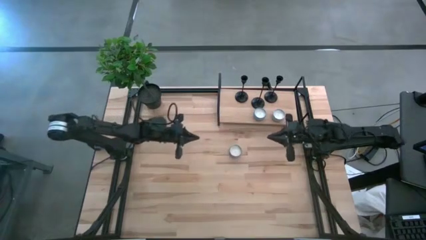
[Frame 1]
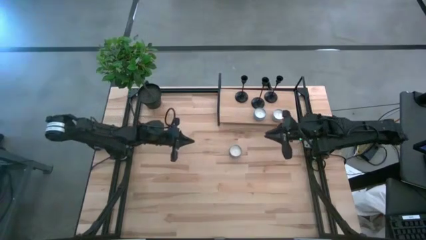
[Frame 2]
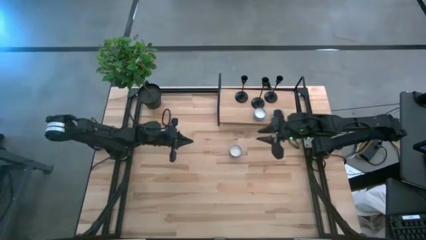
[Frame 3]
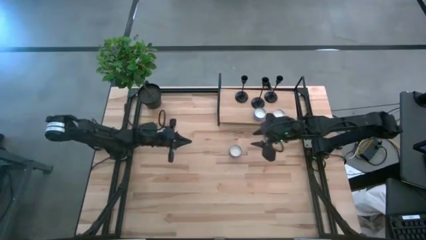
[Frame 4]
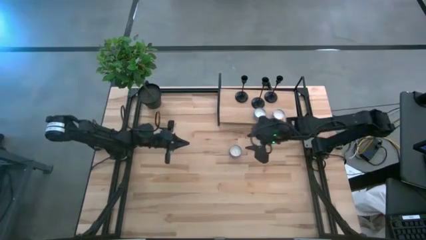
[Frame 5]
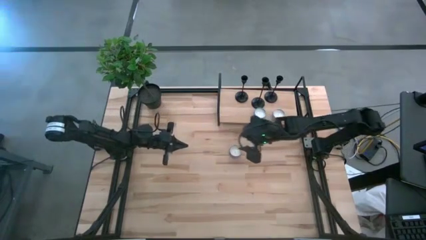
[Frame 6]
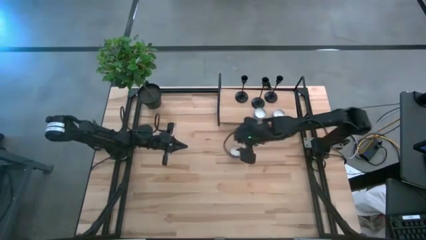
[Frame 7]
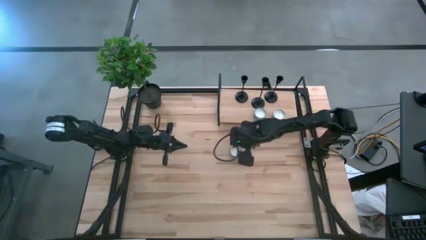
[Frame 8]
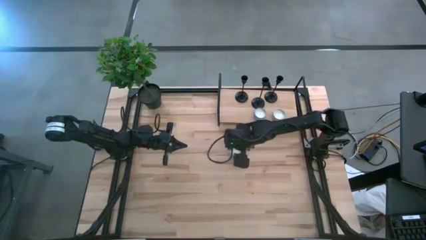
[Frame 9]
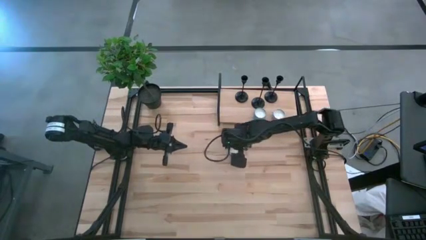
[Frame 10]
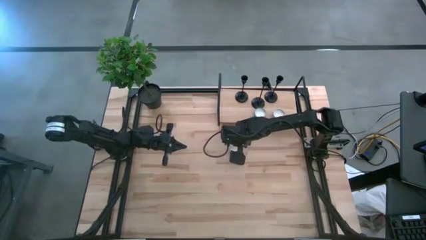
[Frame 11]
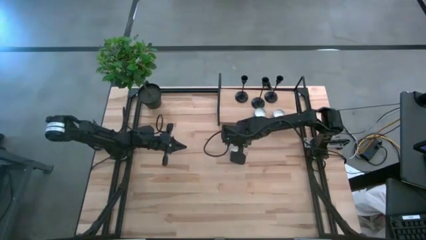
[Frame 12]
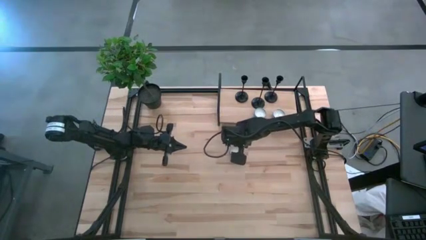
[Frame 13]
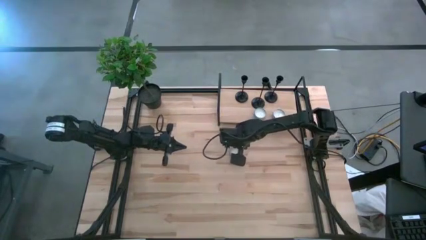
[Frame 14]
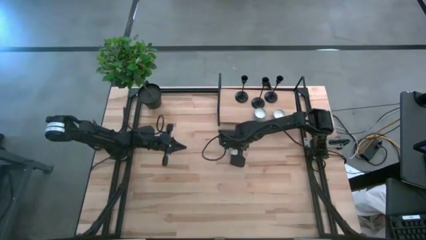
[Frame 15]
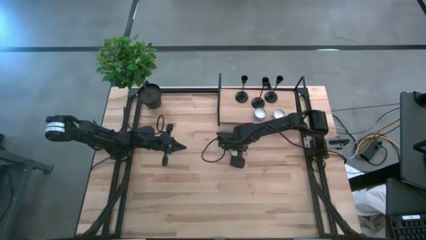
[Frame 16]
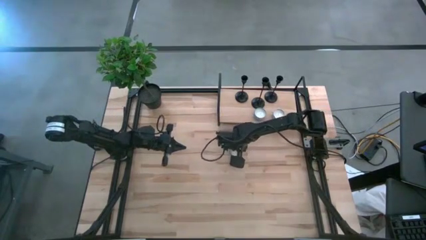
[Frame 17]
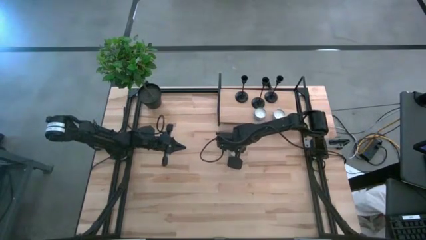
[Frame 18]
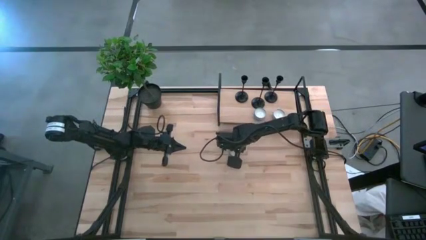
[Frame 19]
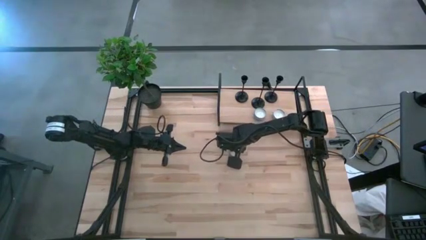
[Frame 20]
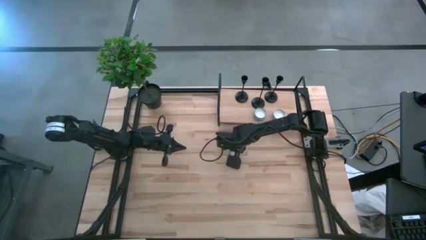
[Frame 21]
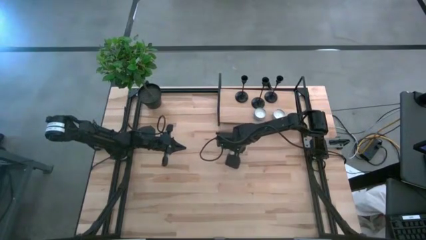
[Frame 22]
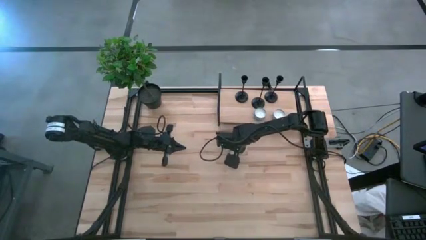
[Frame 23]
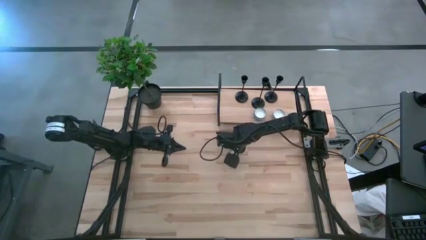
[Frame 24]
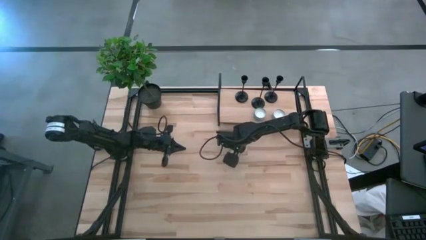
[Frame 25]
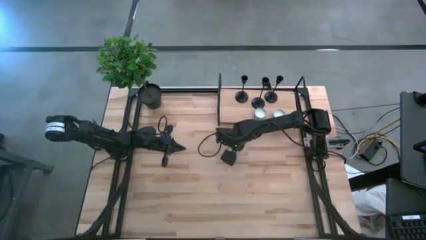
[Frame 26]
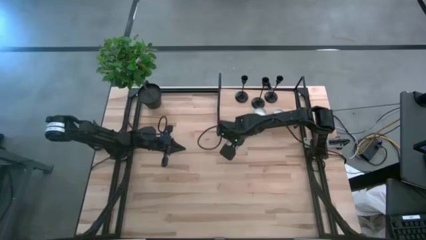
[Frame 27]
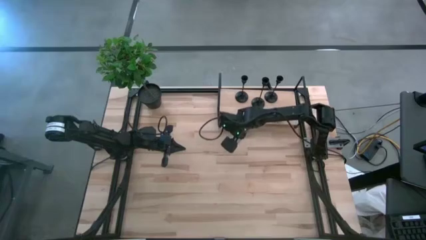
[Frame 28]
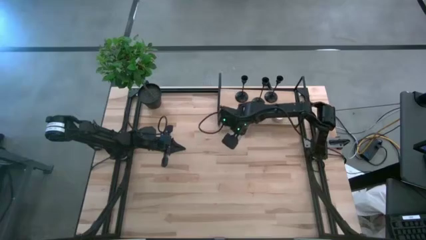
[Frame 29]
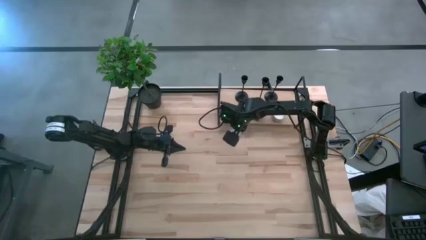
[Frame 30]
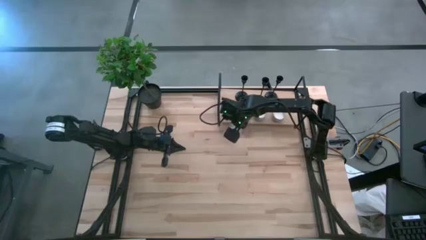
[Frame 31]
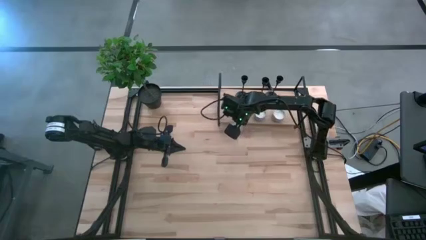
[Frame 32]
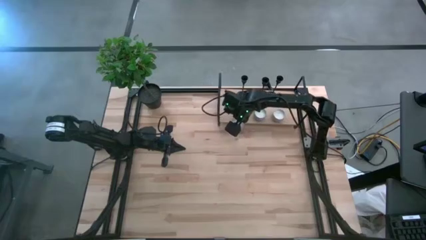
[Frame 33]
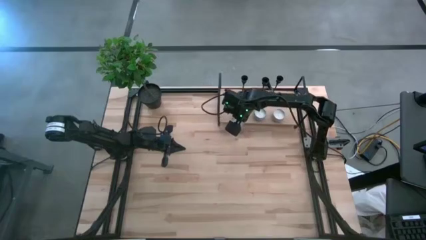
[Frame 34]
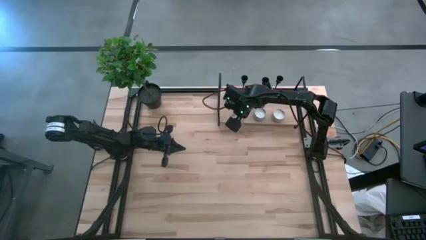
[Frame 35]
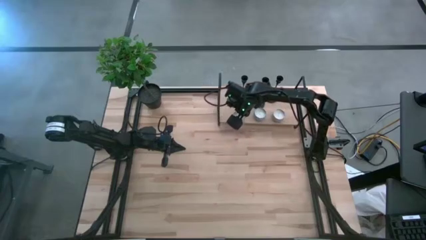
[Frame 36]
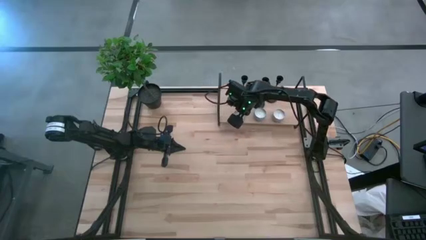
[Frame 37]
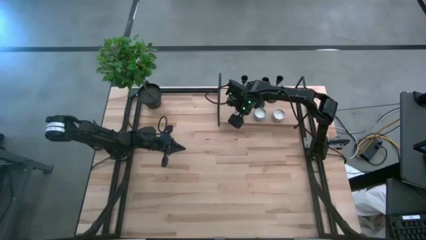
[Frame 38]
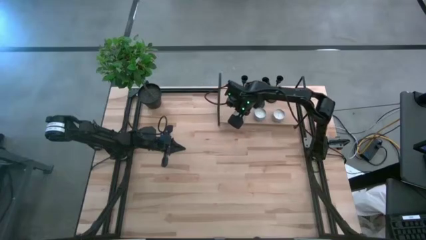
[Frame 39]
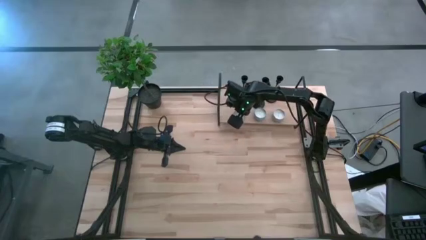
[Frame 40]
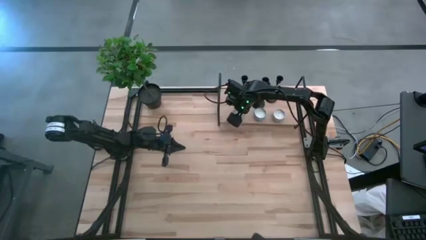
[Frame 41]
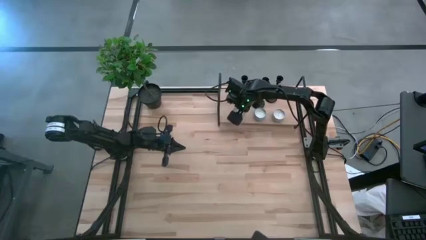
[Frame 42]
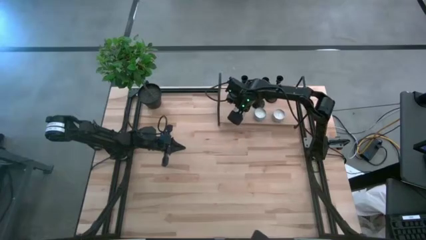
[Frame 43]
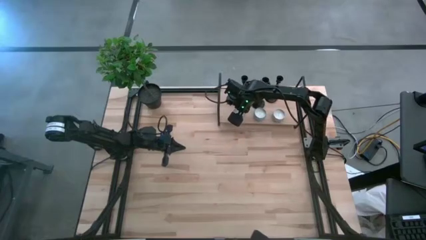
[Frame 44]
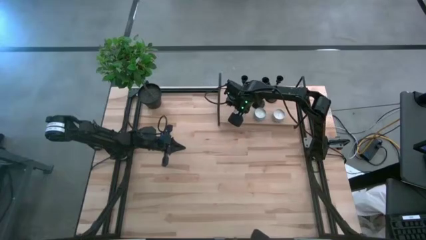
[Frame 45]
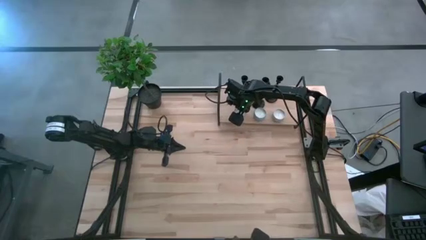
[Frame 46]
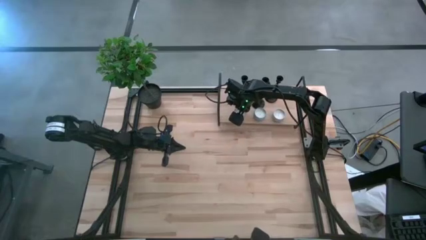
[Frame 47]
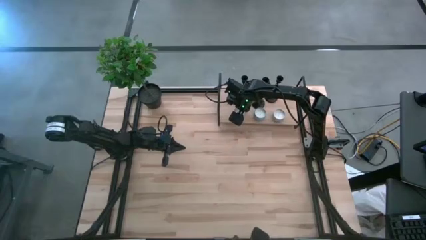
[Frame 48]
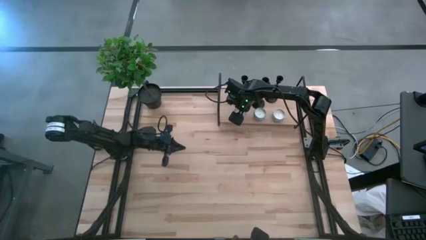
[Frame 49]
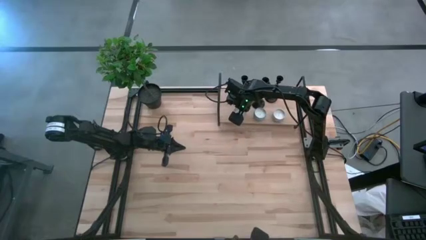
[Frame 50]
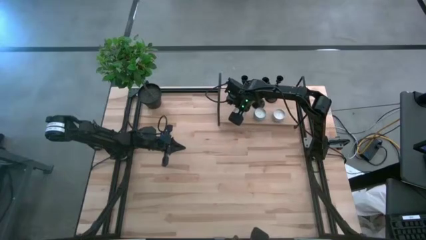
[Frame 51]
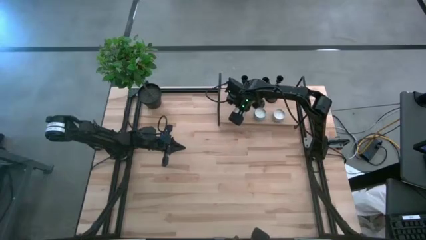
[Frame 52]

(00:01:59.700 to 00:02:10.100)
Task: Pick & Place candle stick holders
Put the pink scented candle on the shelf

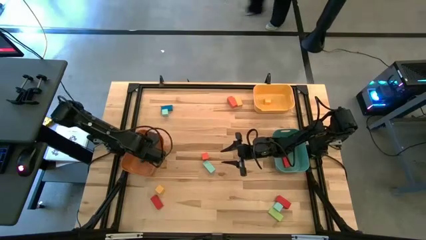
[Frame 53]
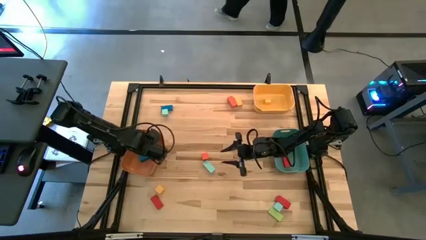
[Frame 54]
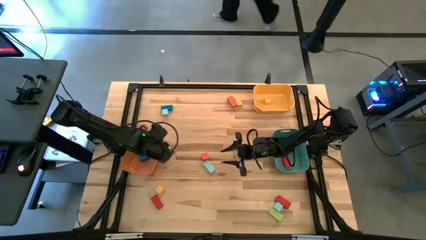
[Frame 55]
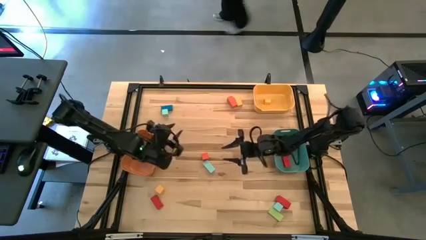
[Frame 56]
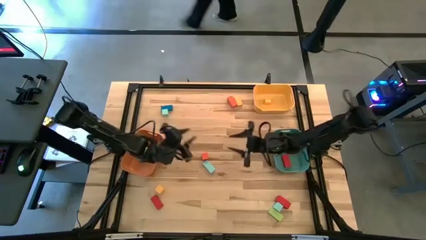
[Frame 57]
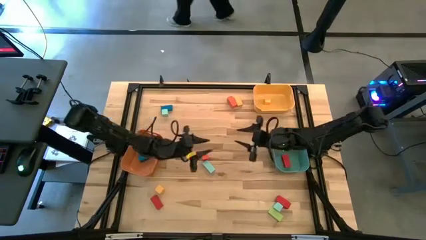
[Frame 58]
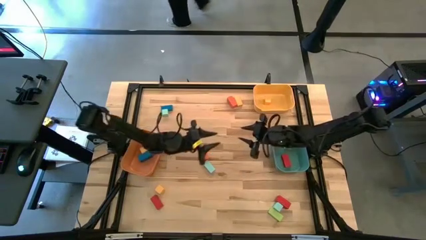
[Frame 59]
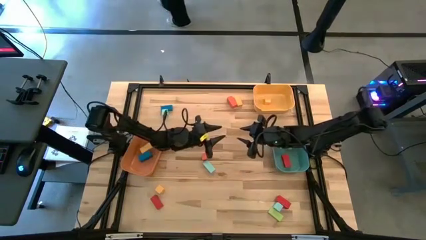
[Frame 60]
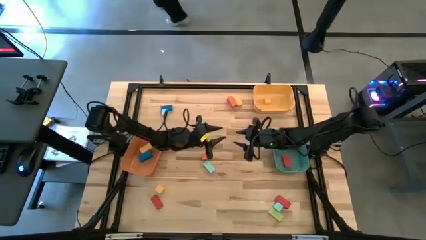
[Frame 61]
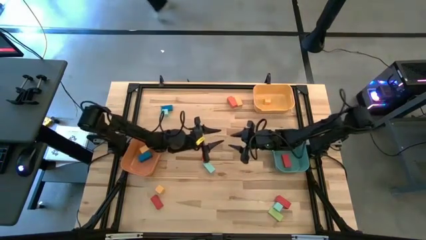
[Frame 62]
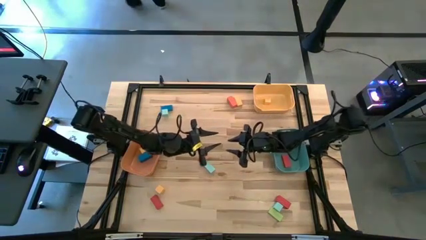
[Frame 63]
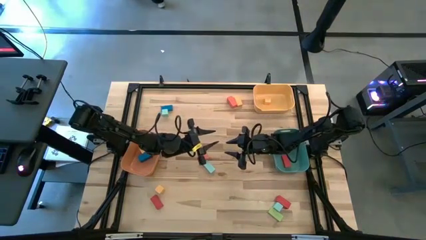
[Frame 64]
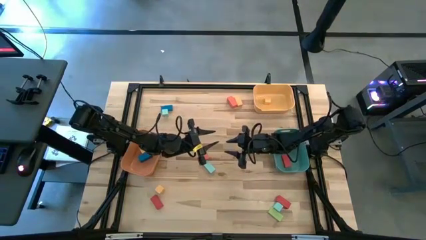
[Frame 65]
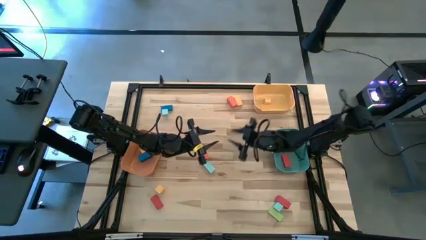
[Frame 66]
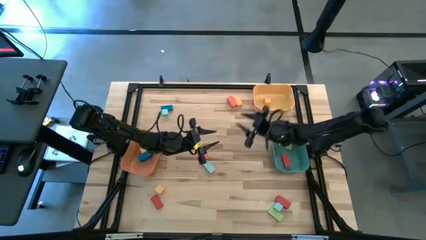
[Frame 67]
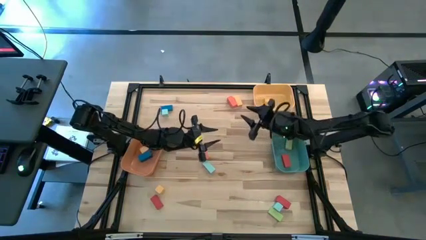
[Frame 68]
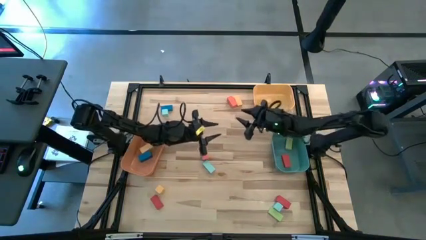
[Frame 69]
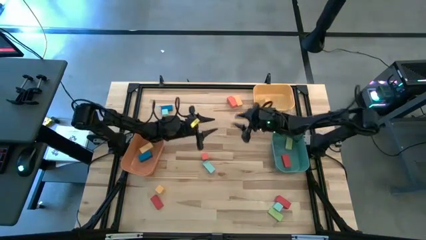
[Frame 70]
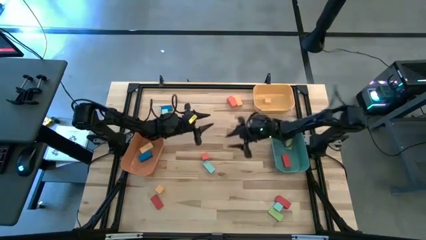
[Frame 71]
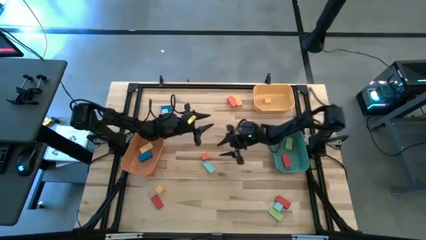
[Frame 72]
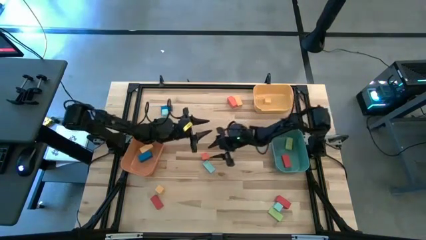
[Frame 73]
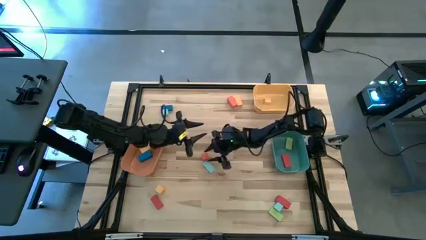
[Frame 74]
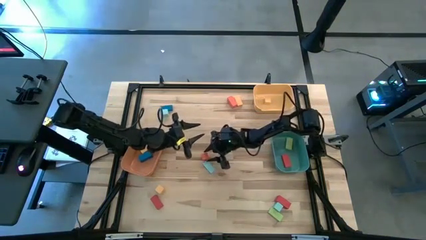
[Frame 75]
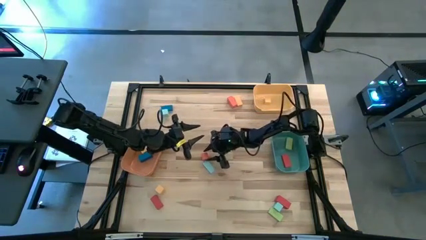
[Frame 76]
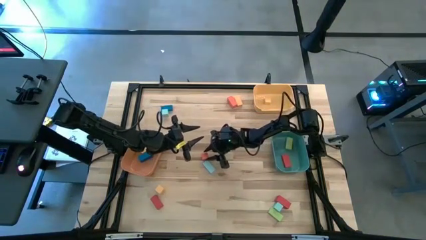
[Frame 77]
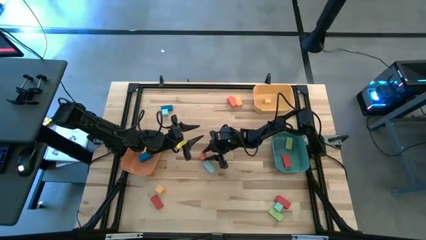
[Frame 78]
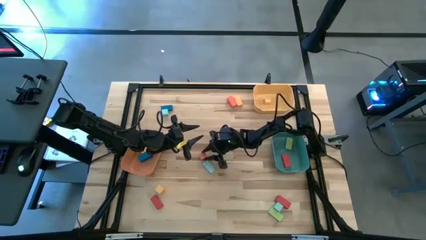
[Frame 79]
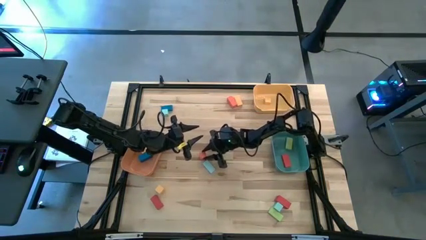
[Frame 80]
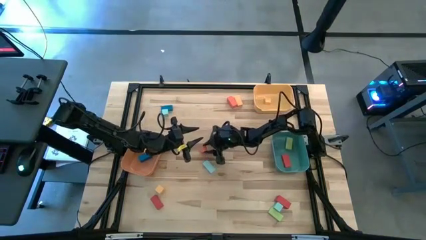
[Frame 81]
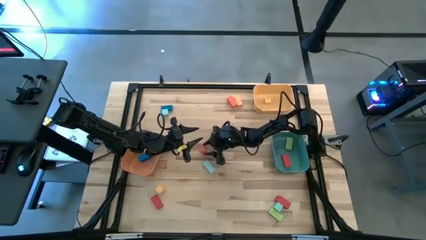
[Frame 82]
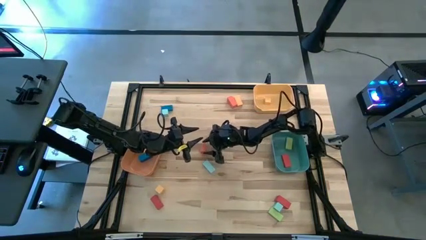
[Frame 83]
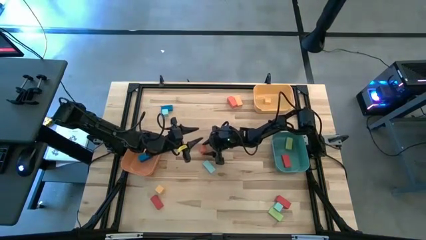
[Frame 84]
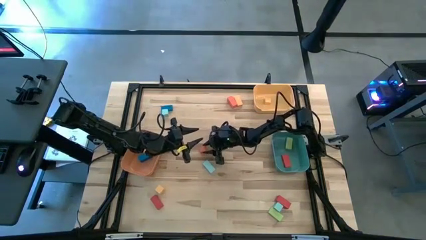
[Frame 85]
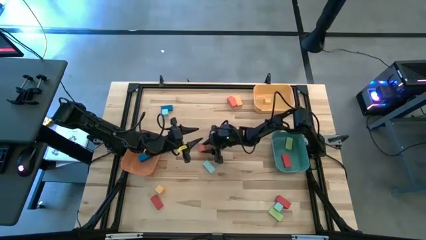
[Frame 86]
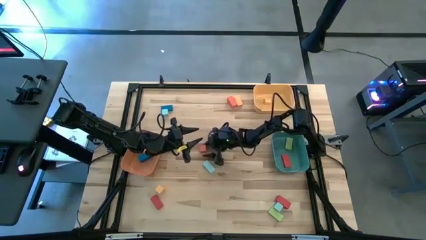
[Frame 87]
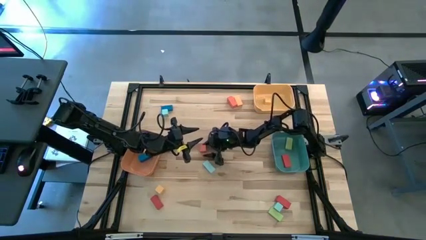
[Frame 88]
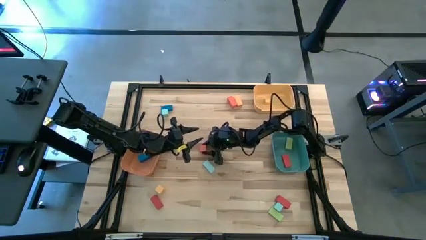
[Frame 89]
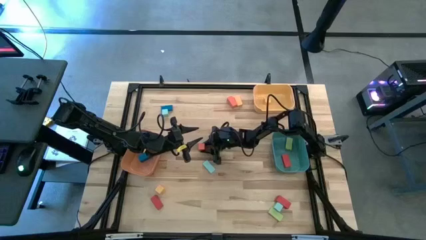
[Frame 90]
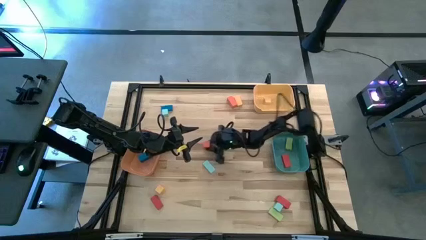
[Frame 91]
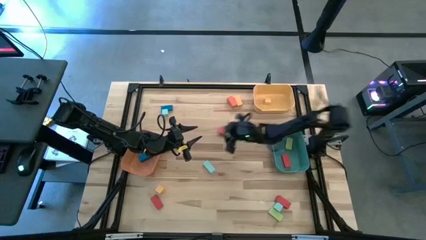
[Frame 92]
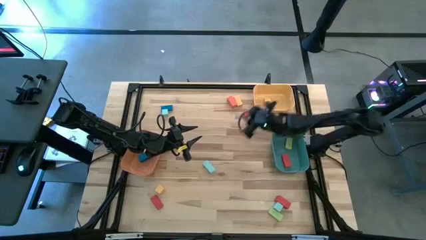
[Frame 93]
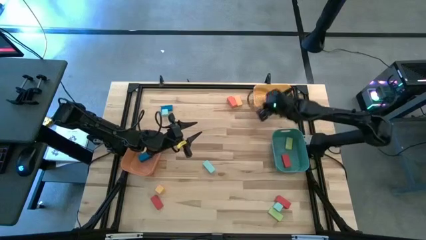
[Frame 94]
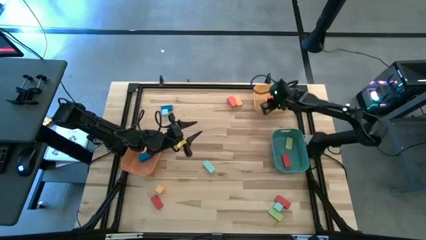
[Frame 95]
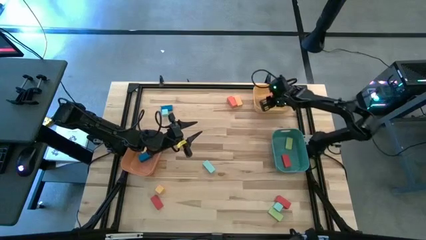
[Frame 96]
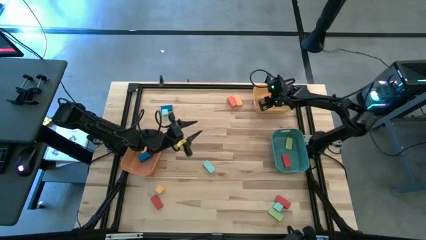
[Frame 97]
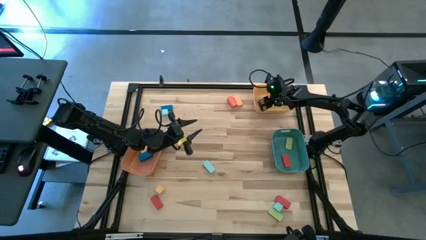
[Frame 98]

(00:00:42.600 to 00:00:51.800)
Task: Sort blocks by size
Put the orange cube block into the yellow bin
